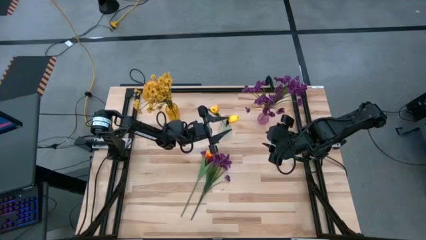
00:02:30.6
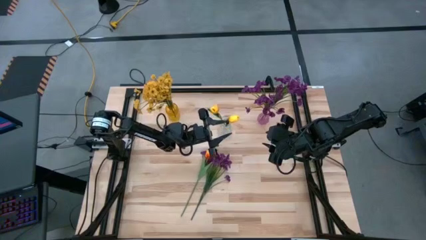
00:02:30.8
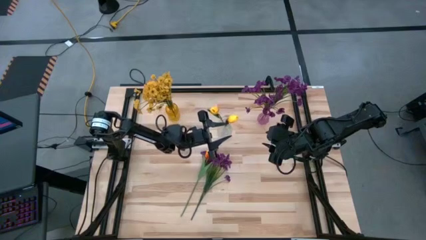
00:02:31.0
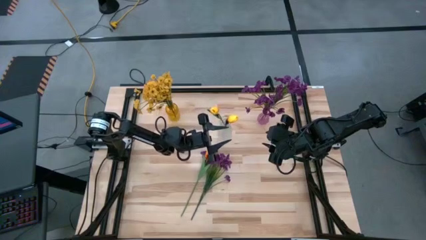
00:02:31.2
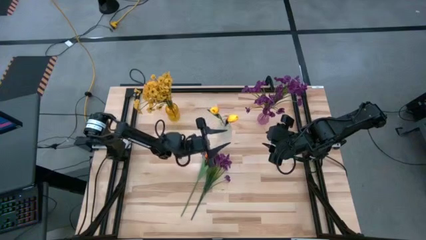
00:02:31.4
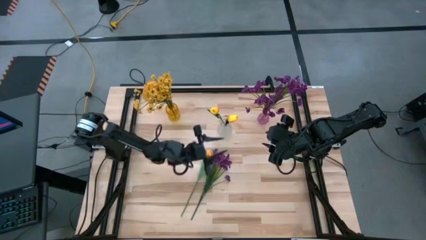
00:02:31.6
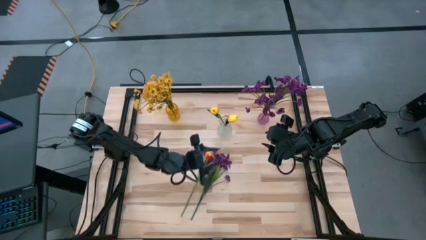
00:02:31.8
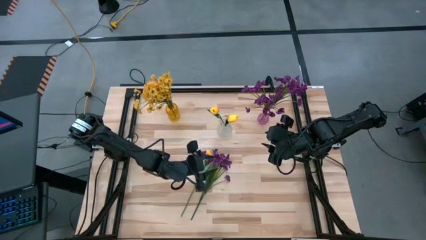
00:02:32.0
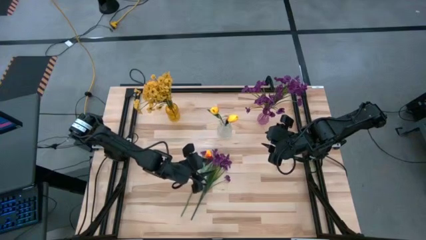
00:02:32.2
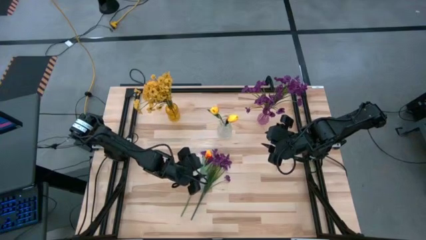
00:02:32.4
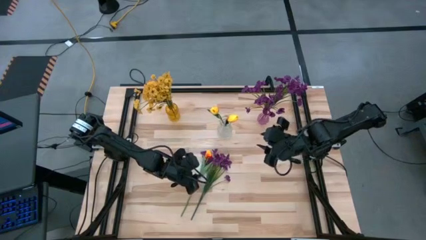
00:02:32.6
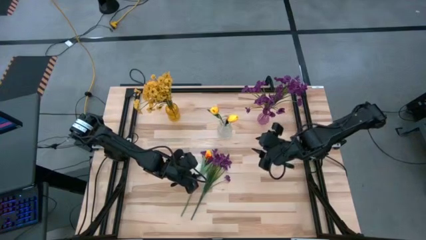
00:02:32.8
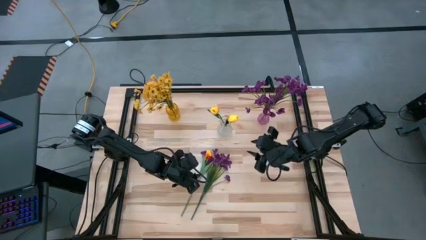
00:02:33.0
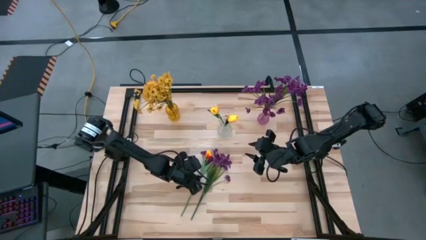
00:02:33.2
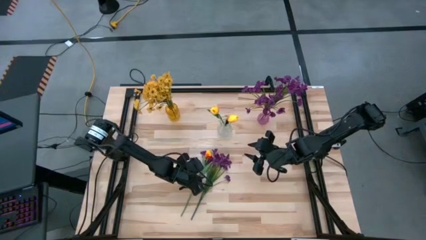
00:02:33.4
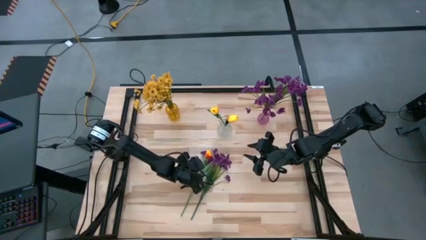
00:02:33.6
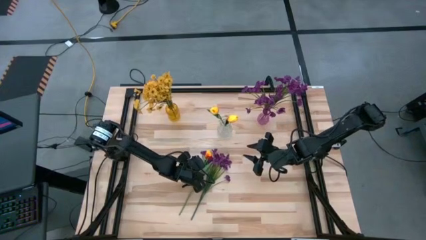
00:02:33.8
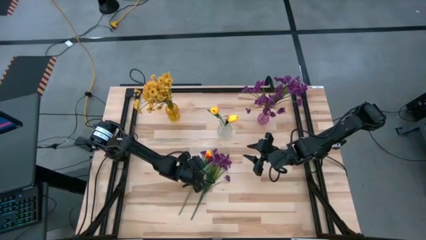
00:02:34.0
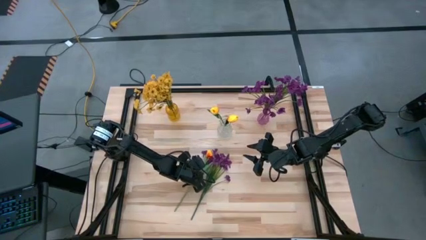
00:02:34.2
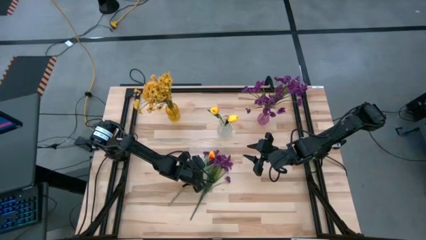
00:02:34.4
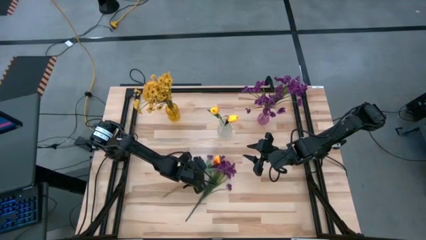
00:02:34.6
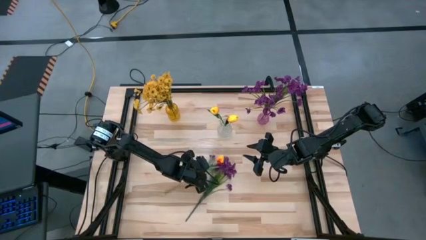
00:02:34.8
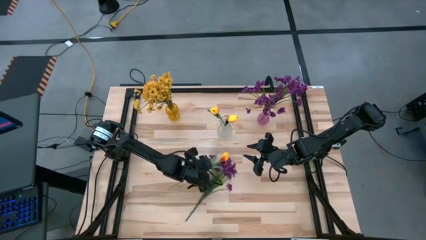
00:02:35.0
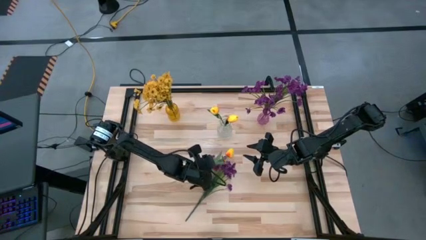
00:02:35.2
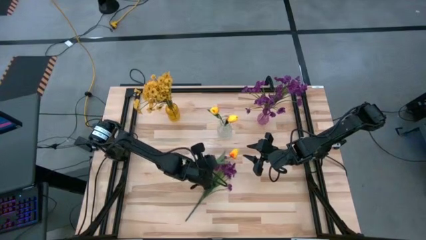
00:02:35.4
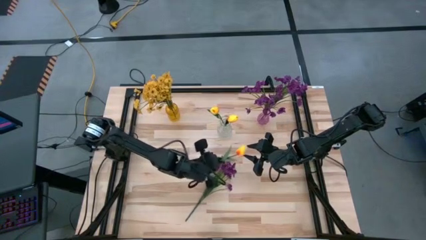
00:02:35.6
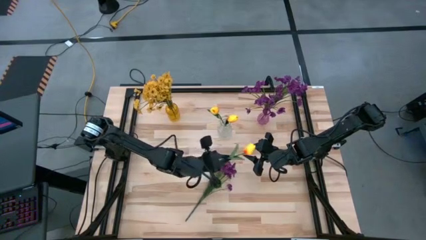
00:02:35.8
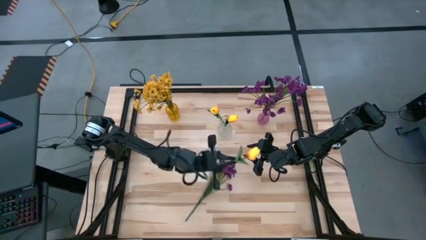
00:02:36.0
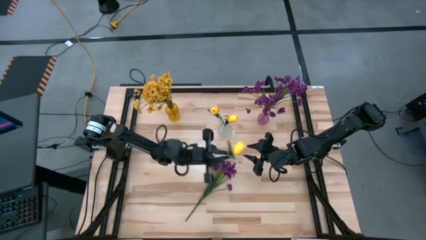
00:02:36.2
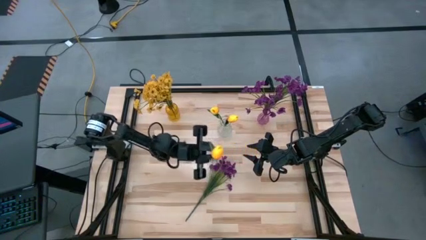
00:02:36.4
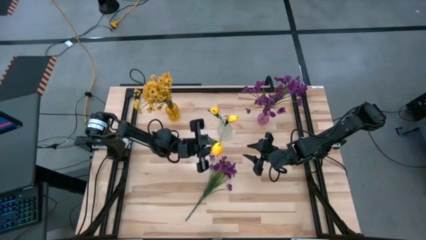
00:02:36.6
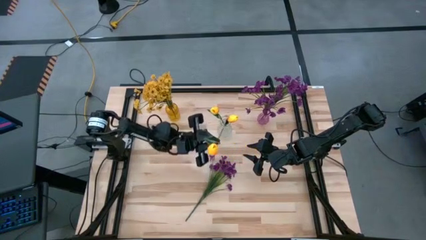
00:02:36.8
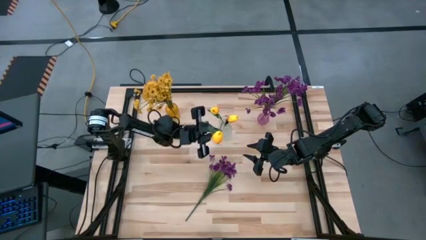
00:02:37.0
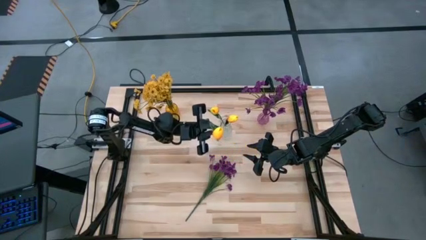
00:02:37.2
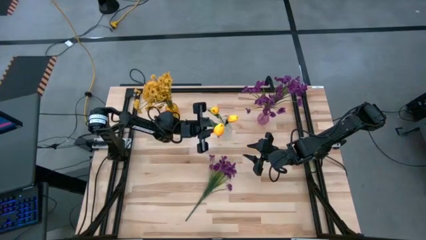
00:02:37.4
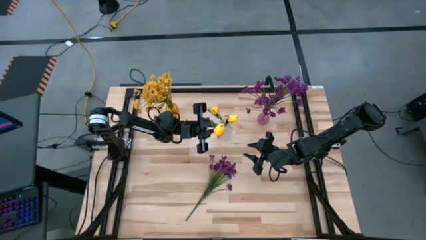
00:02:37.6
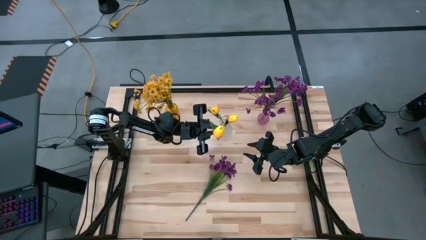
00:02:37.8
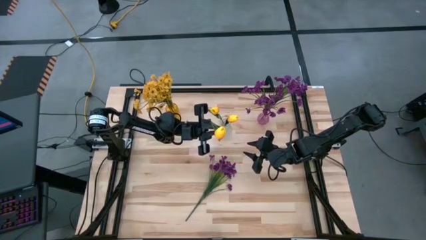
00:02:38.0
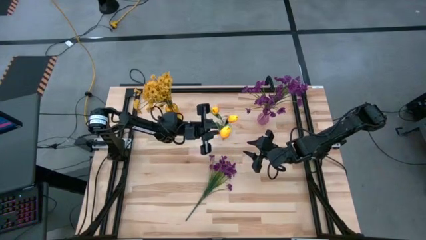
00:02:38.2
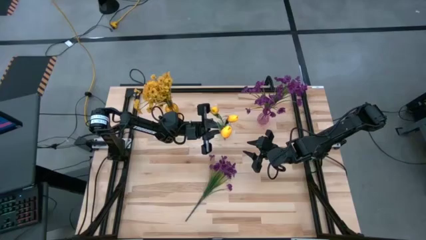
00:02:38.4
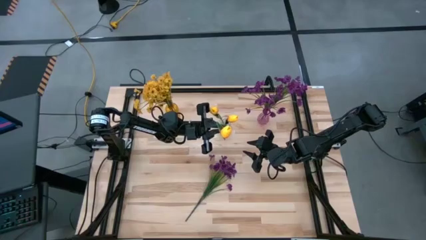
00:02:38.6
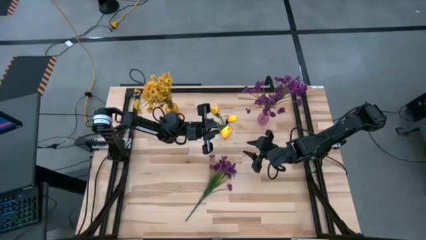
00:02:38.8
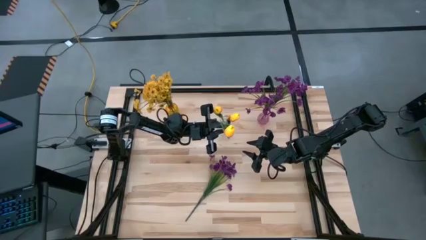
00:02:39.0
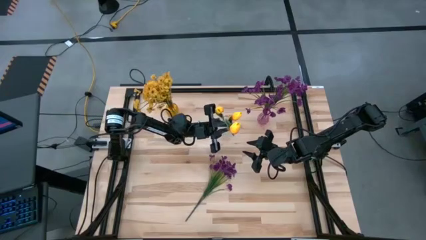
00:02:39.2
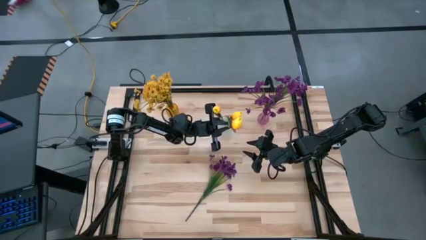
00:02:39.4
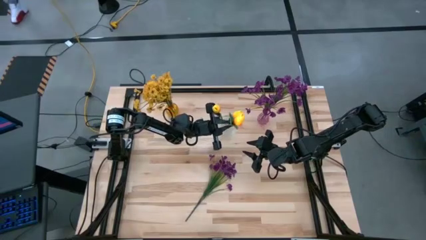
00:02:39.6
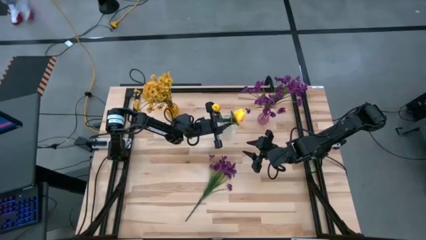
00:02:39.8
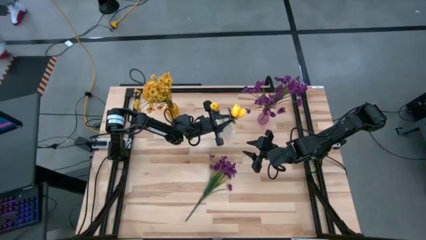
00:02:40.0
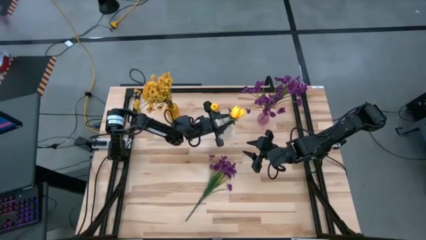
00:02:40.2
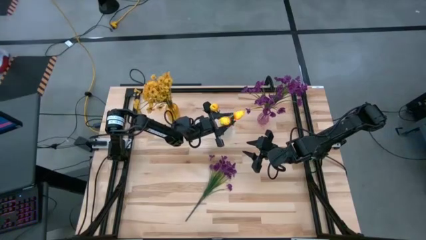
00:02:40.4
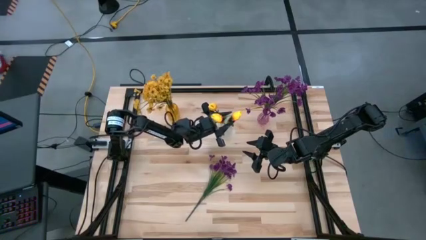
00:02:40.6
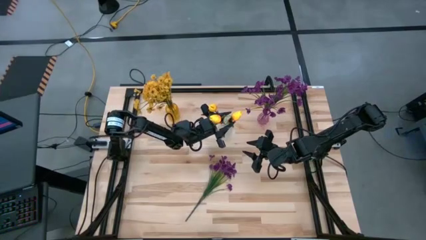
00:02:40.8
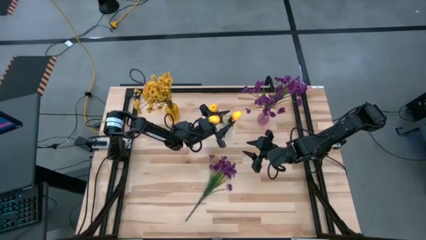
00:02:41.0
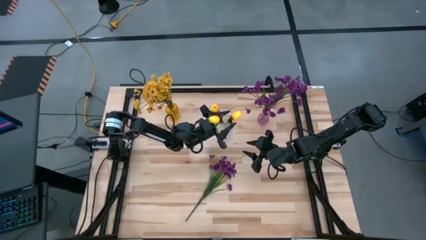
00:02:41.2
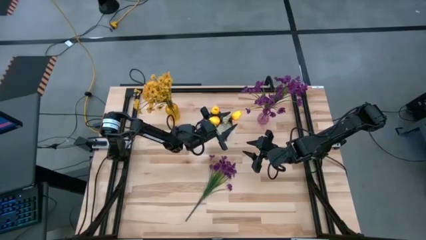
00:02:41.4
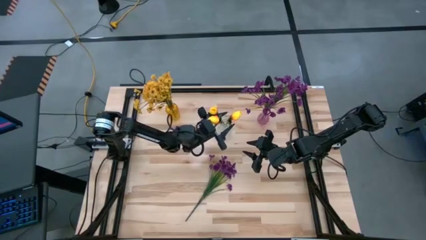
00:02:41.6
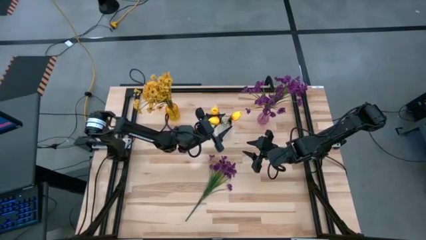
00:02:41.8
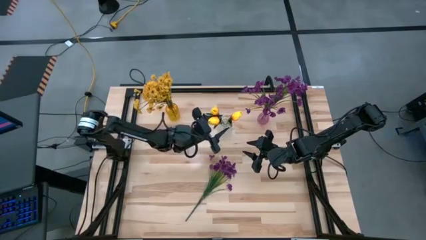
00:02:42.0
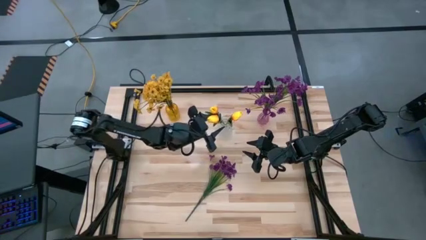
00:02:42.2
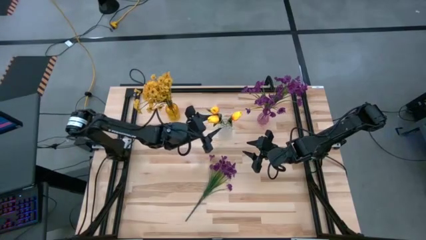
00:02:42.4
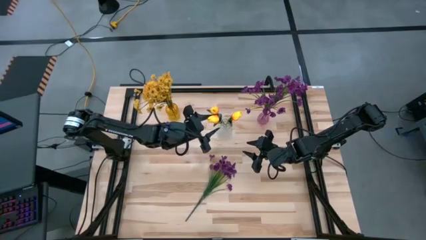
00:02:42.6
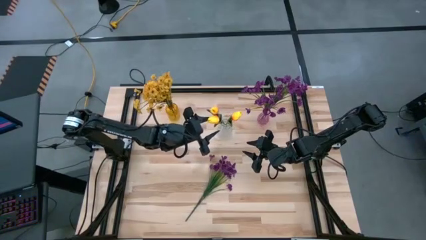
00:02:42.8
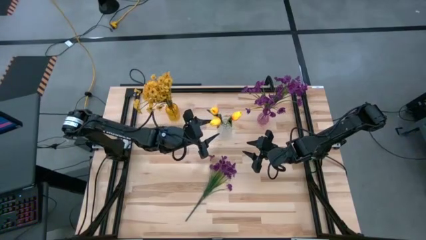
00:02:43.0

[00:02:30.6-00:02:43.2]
Task: Sort flowers into vase by color
Put the yellow tulip into the transparent vase
